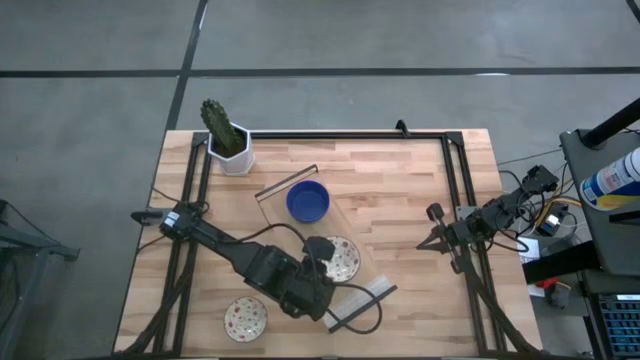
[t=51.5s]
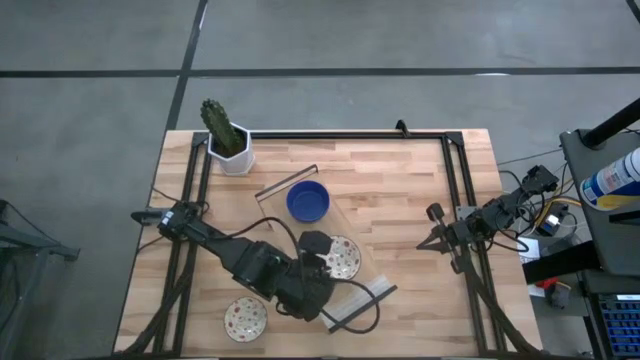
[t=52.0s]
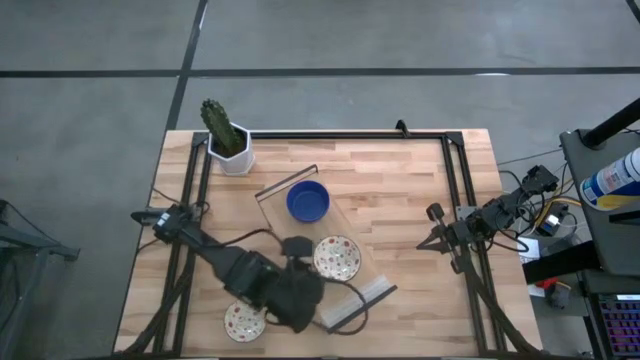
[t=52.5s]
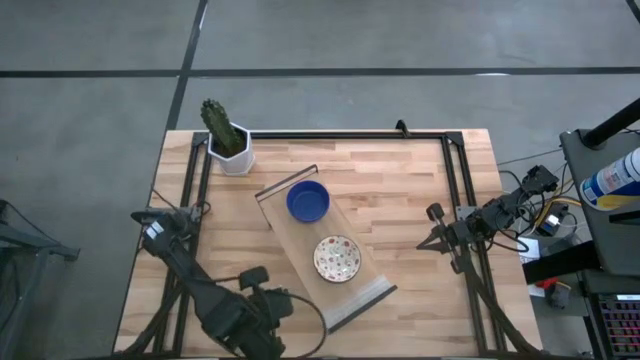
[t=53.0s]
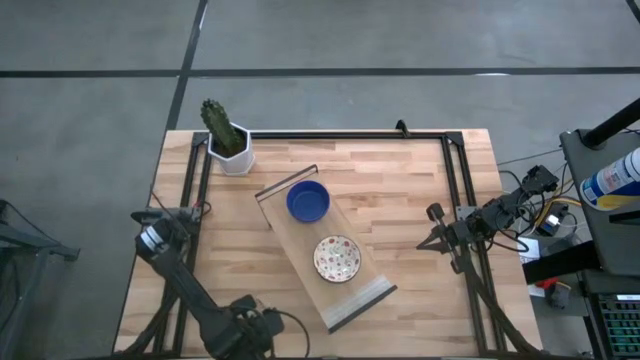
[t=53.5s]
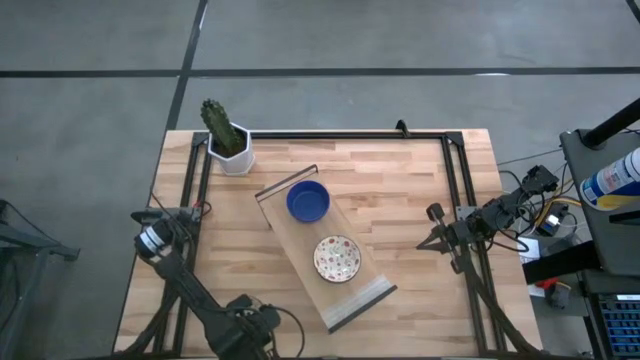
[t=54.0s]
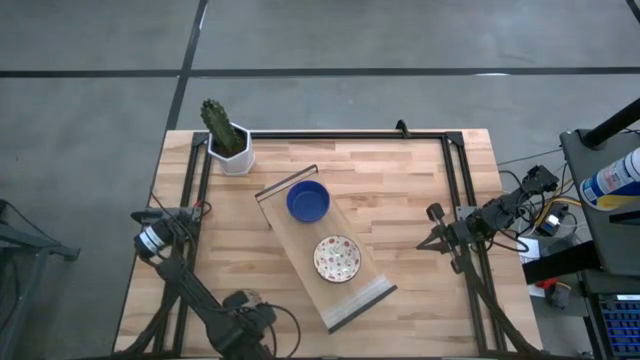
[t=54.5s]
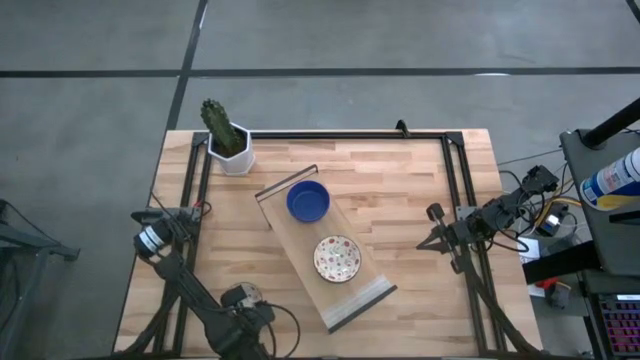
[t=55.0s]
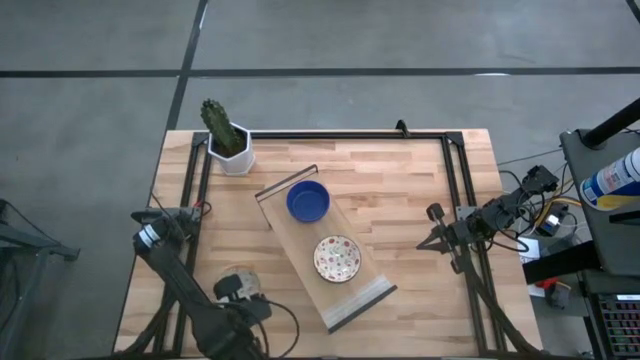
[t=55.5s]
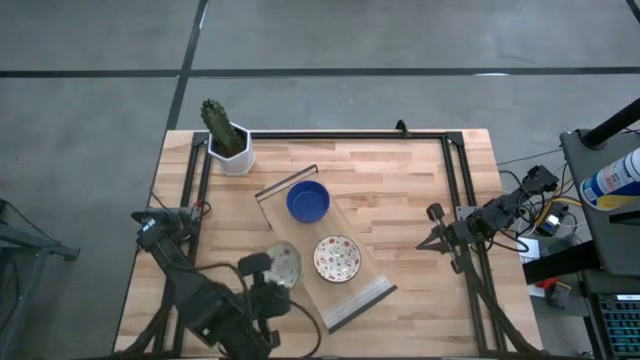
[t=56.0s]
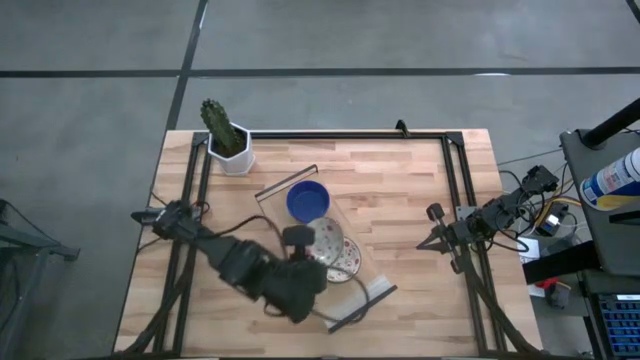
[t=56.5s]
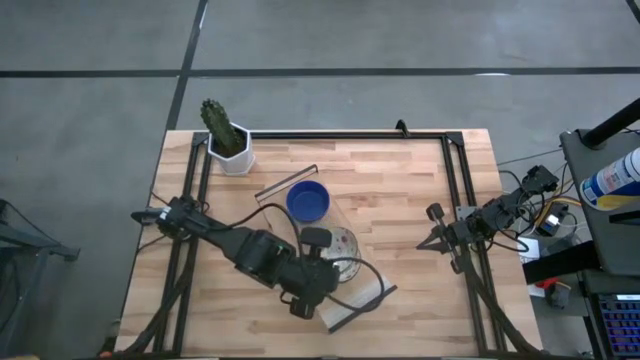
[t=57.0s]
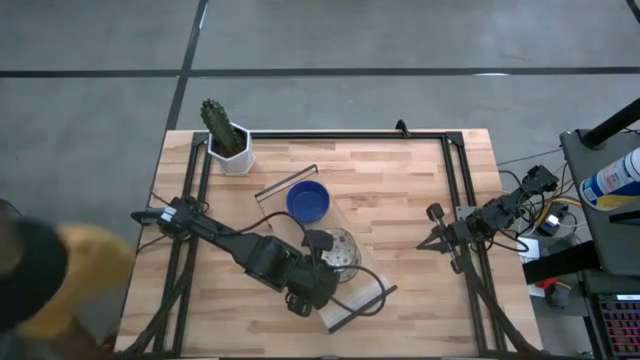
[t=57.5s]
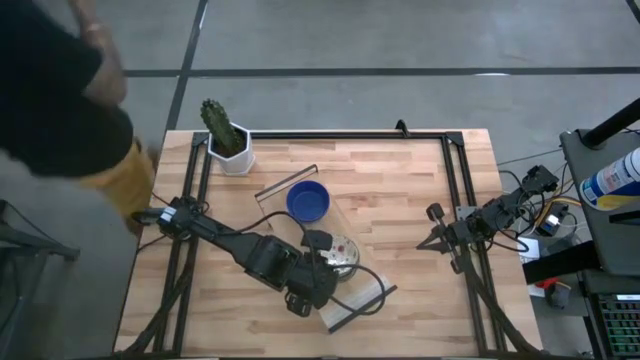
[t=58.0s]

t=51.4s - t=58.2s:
Task: Pick & Place Mini bowls
Stack the white patterned bowl on the white patterned bowl on the shelf

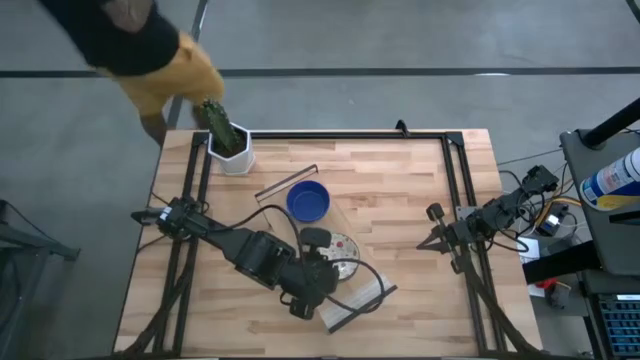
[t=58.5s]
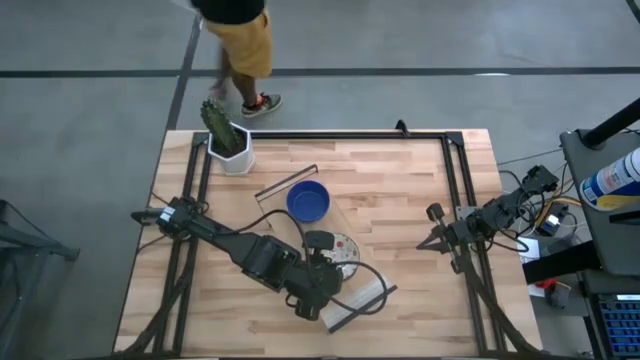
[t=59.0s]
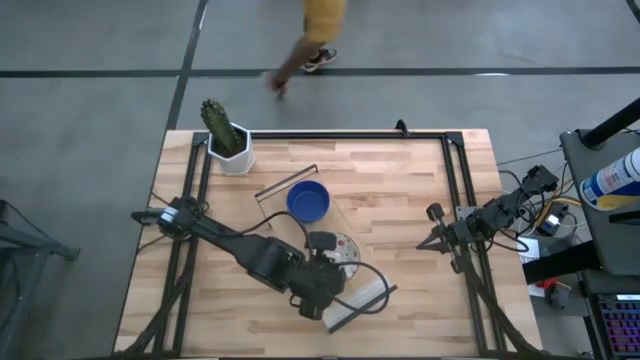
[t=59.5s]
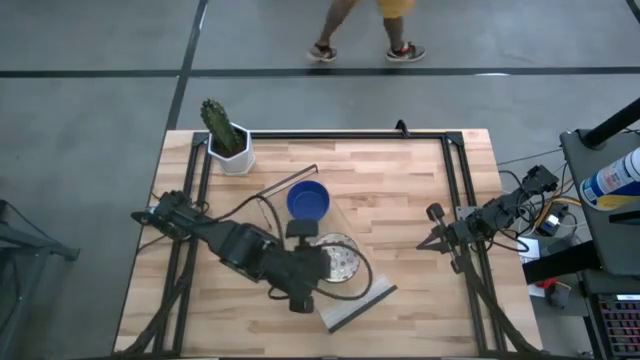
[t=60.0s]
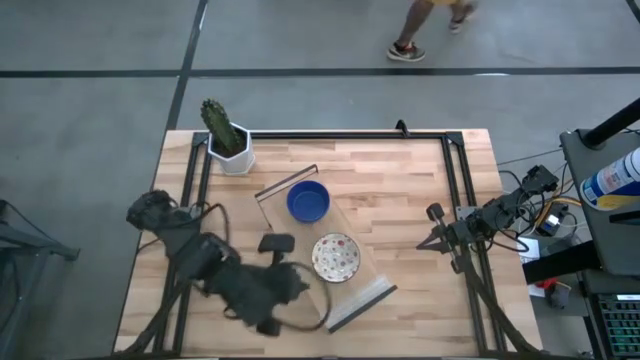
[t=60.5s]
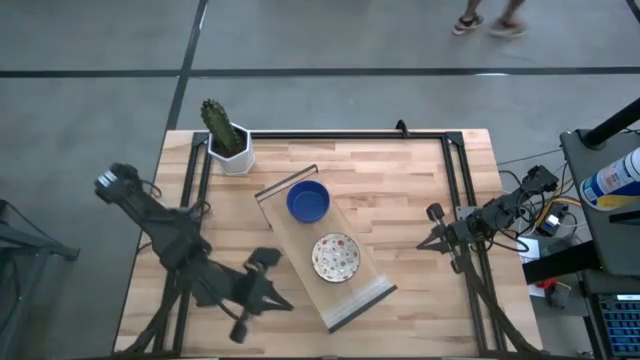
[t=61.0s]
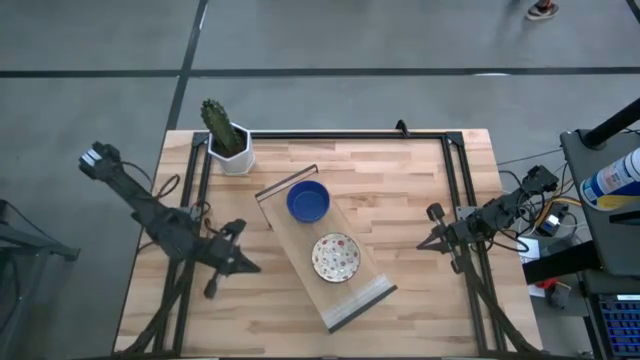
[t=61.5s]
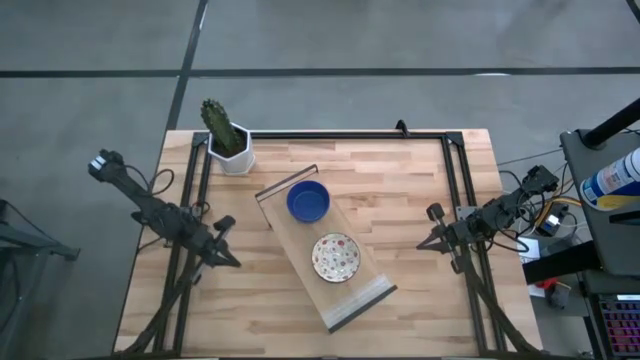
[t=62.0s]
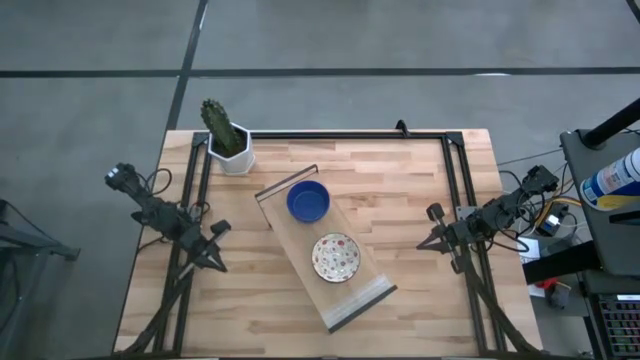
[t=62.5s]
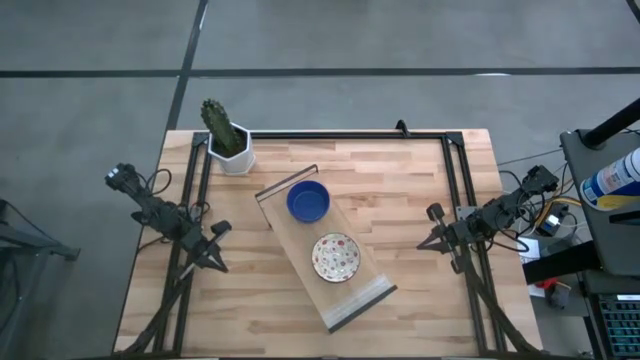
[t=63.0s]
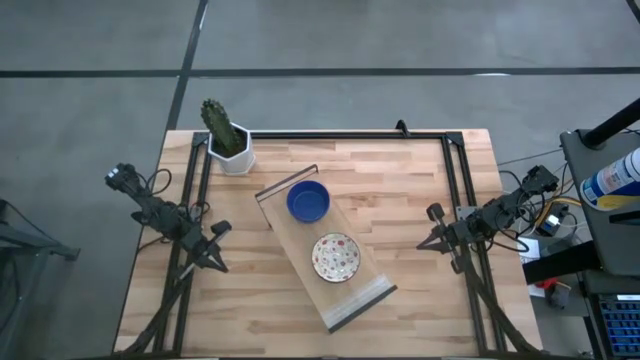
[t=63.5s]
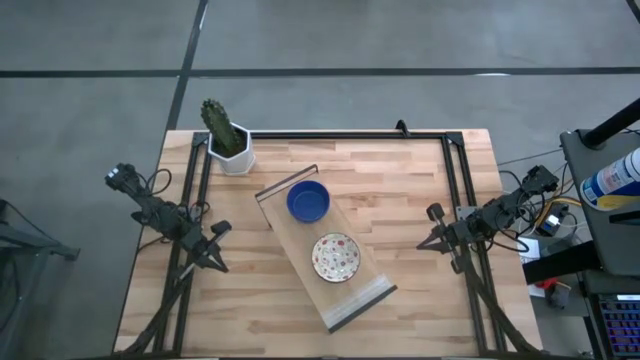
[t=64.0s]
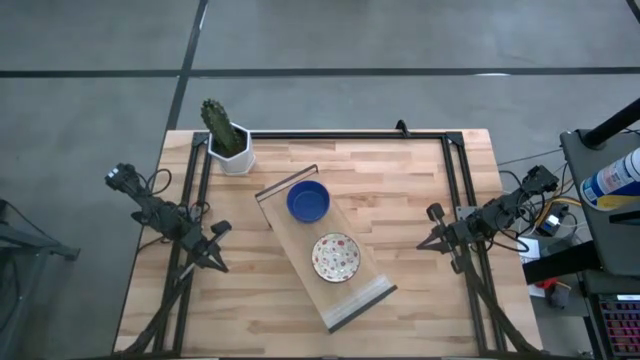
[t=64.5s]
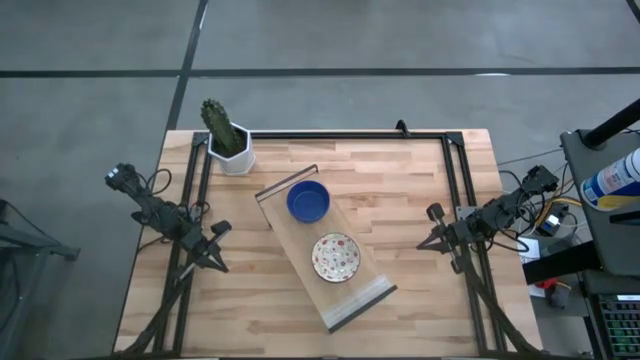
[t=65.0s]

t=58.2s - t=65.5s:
Return to Home Position

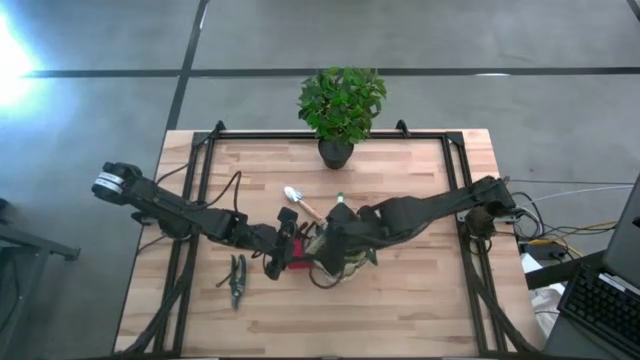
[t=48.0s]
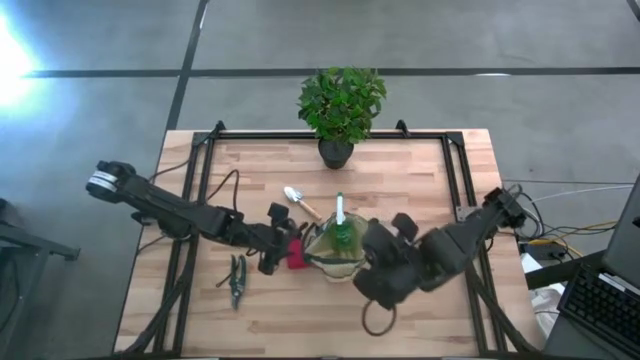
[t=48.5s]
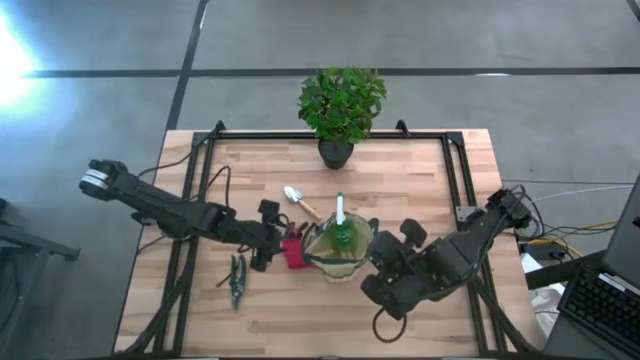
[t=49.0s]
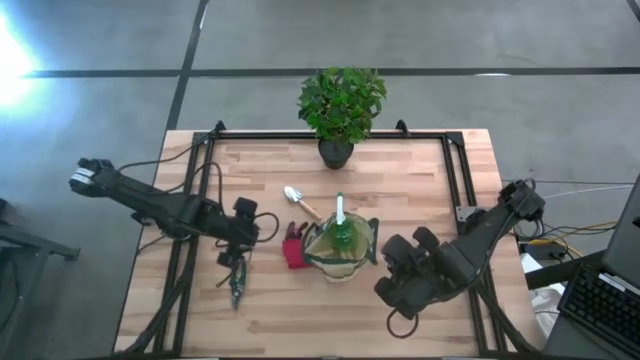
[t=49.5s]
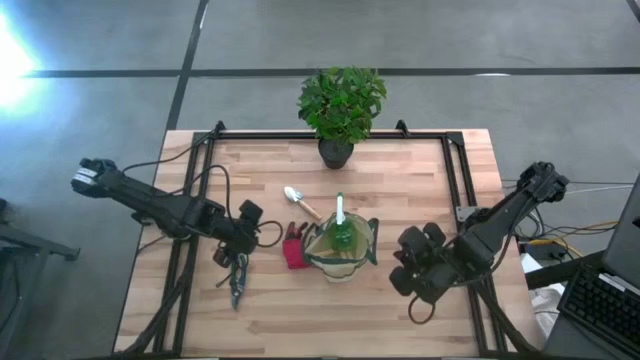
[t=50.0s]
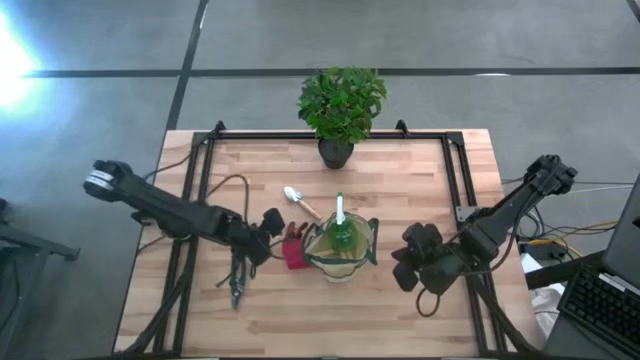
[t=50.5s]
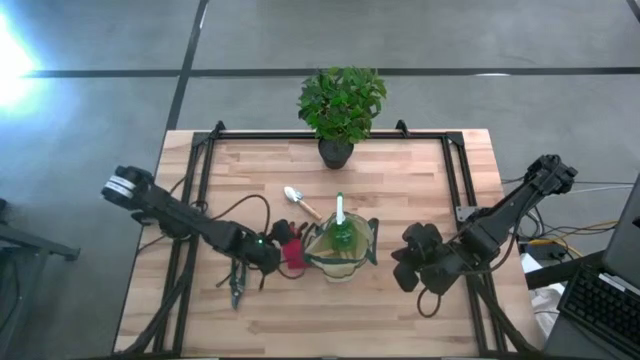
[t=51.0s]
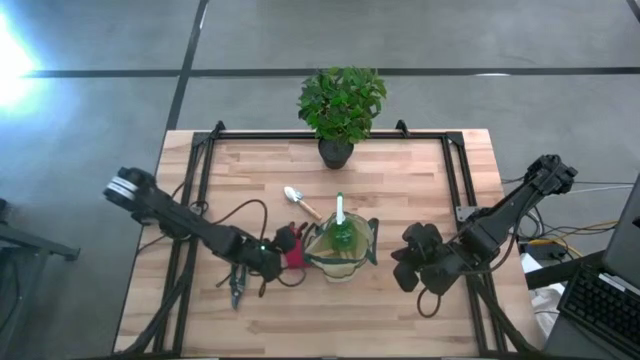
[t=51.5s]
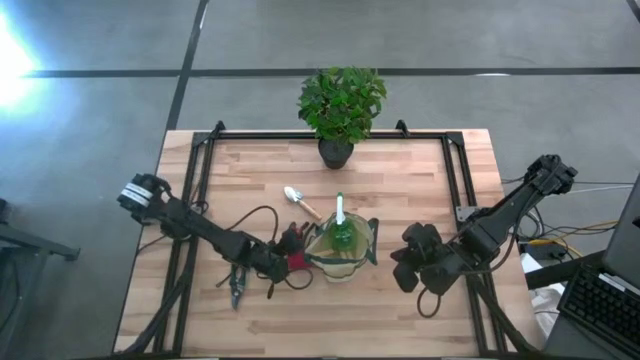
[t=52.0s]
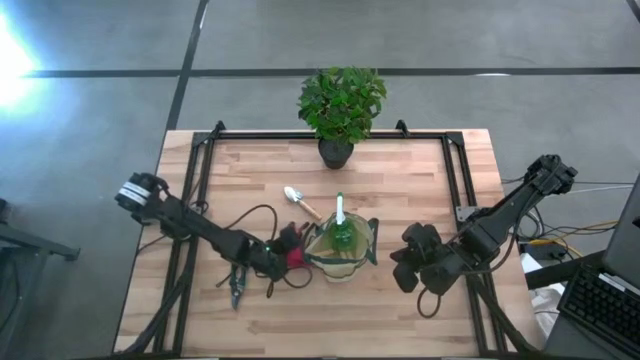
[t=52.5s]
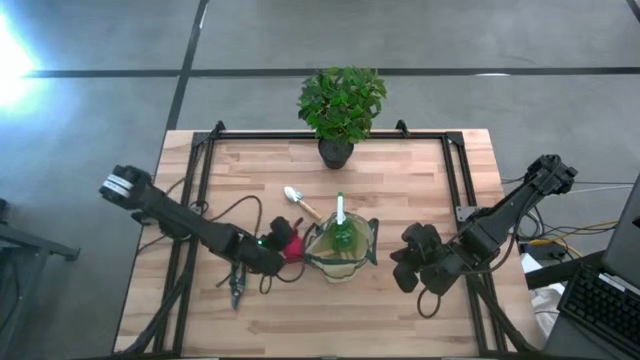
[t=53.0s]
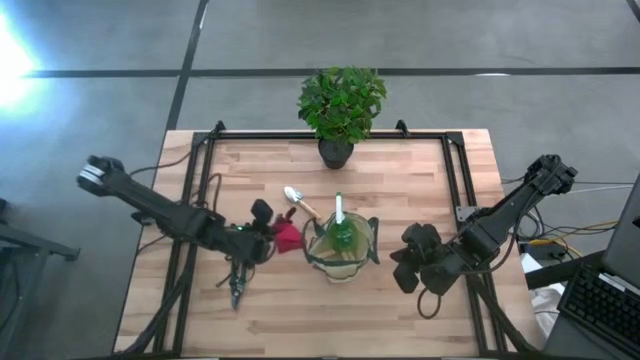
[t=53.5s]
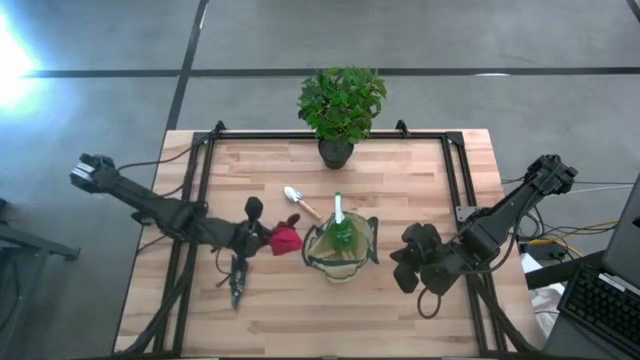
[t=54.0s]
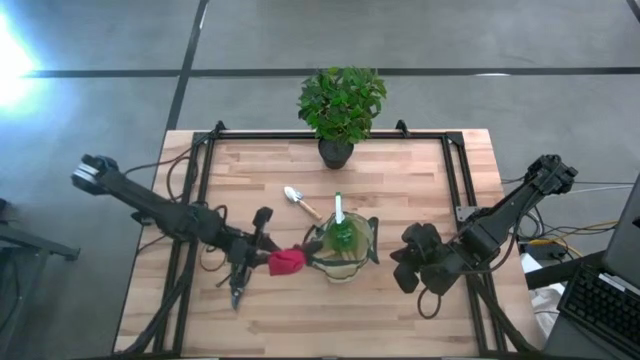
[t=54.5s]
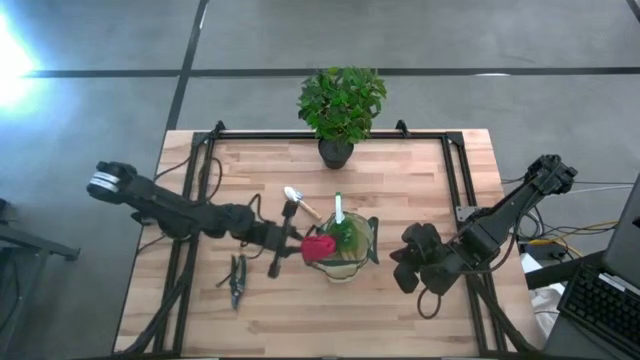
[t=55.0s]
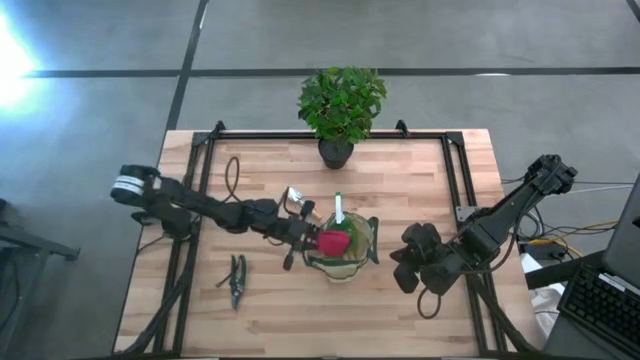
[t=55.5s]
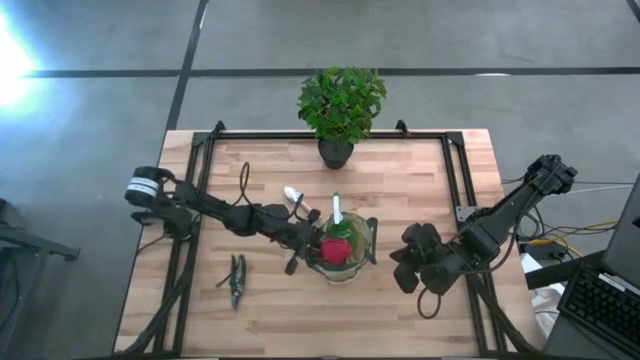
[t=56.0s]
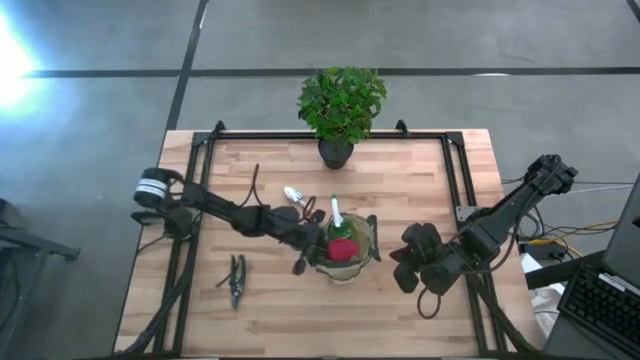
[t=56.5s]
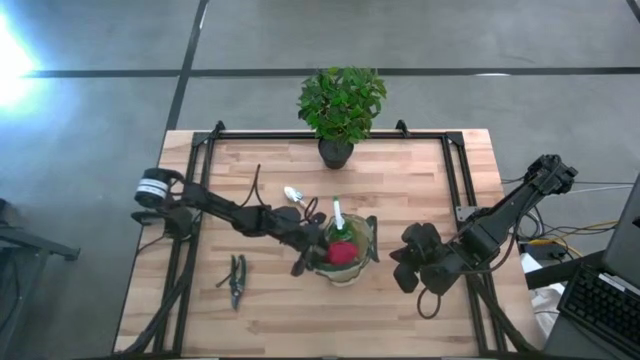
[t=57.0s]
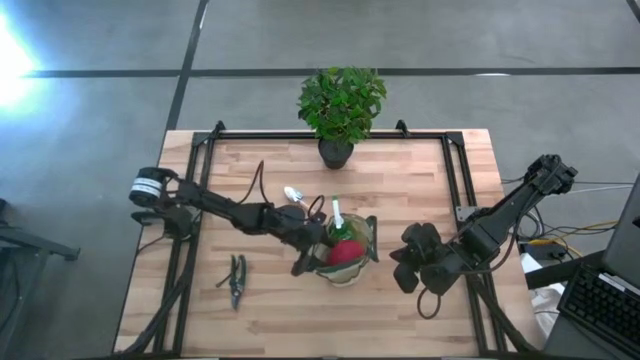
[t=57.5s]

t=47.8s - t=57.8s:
Task: Pick & Place Garden tools in Gardening bag
Put the red gloves into the gardening bag
